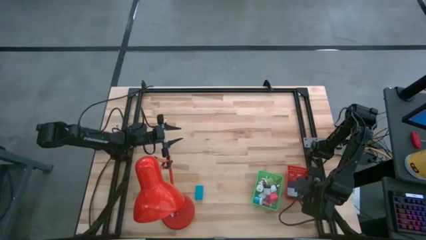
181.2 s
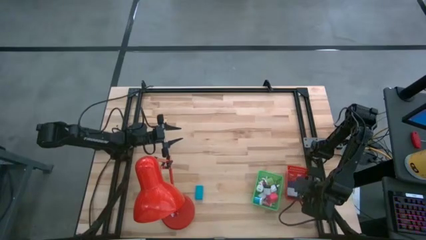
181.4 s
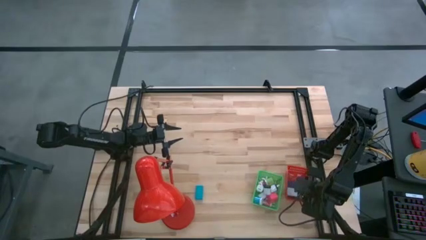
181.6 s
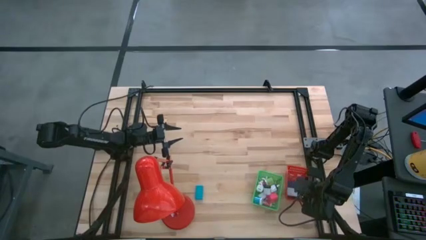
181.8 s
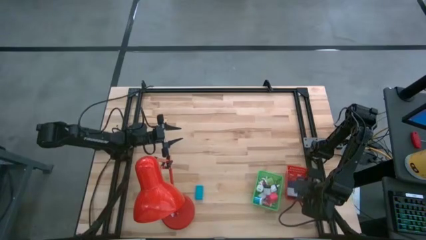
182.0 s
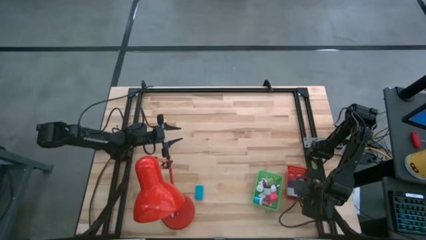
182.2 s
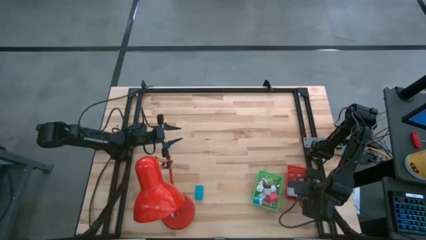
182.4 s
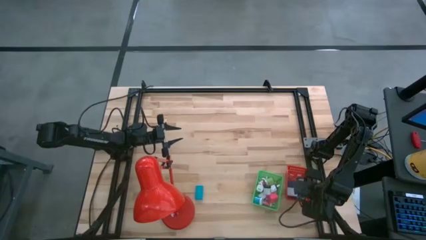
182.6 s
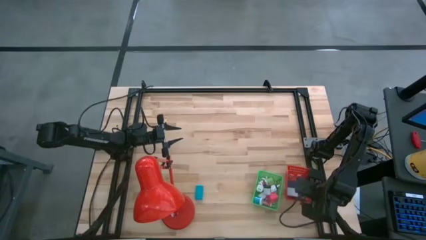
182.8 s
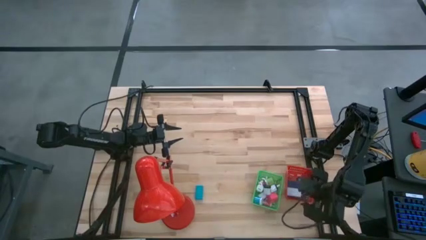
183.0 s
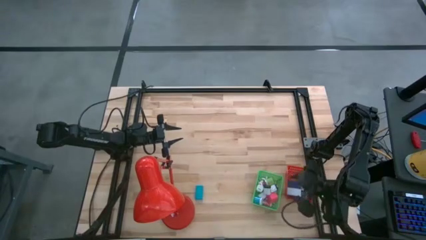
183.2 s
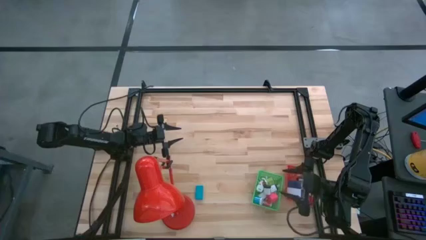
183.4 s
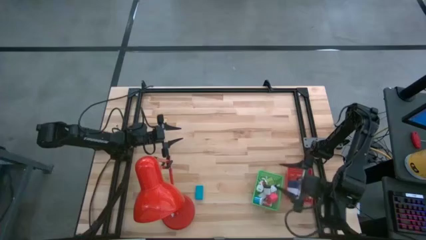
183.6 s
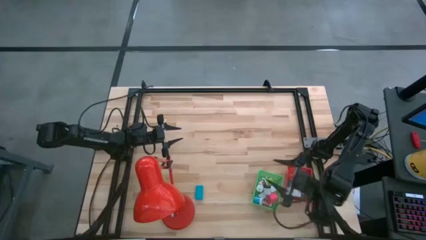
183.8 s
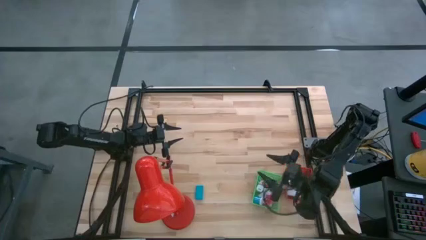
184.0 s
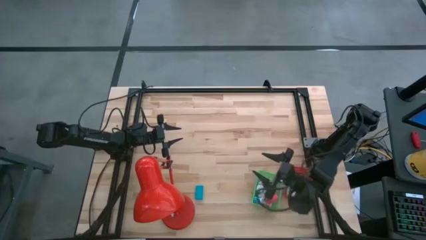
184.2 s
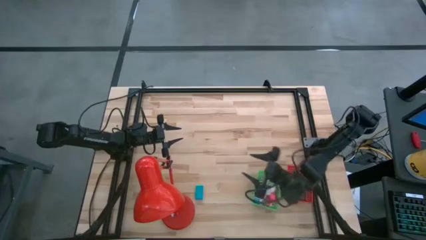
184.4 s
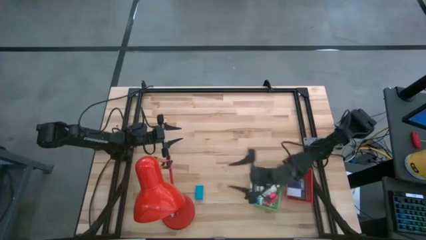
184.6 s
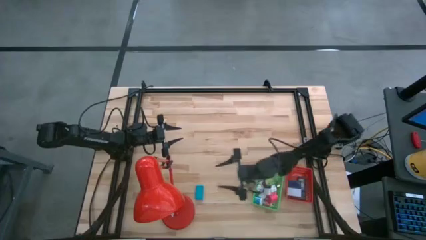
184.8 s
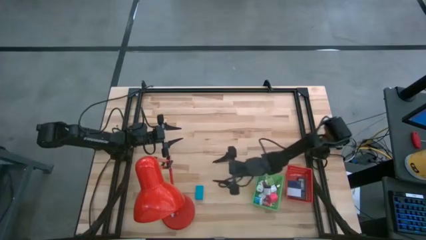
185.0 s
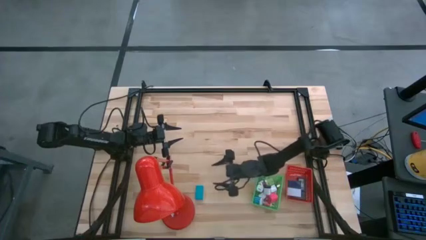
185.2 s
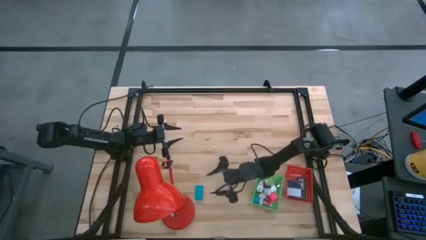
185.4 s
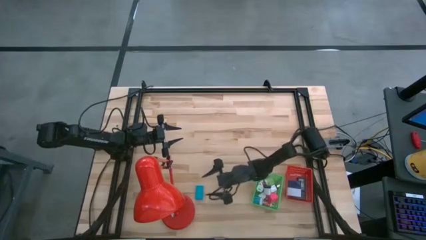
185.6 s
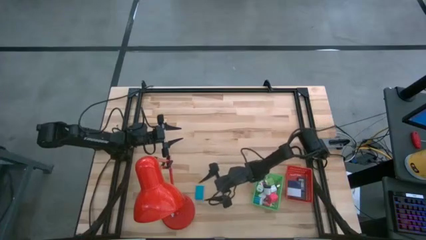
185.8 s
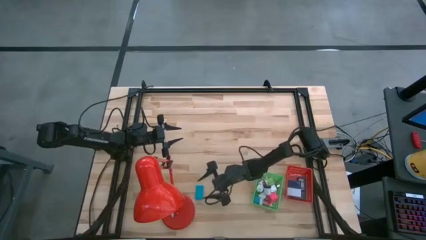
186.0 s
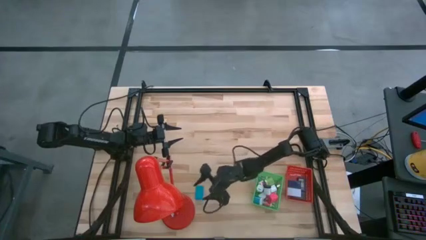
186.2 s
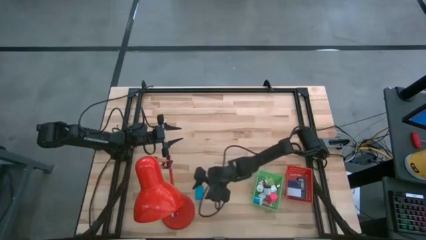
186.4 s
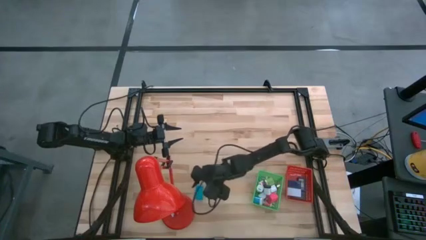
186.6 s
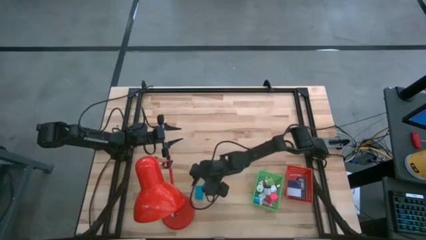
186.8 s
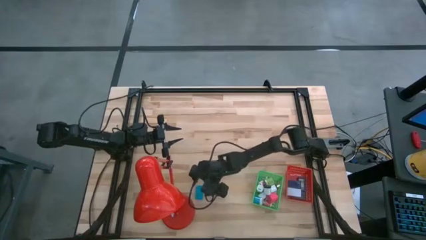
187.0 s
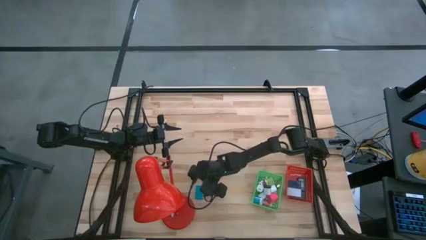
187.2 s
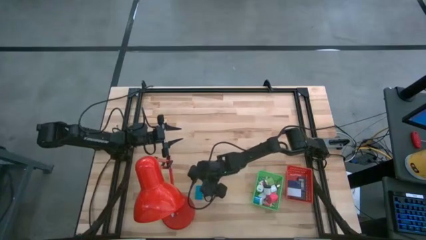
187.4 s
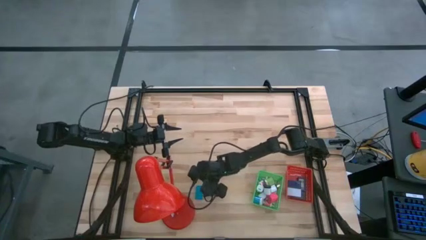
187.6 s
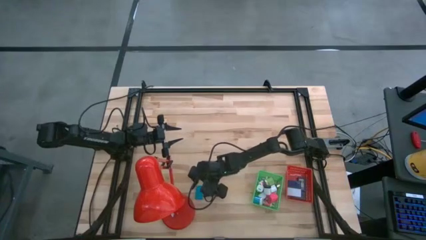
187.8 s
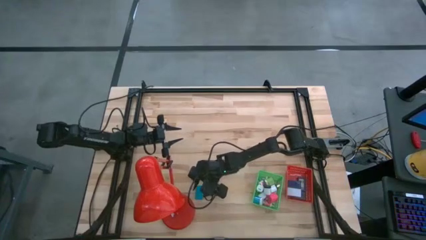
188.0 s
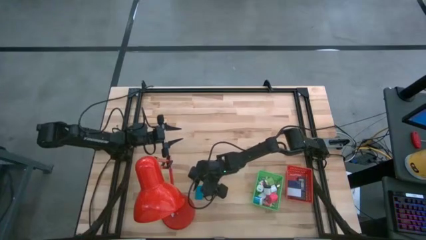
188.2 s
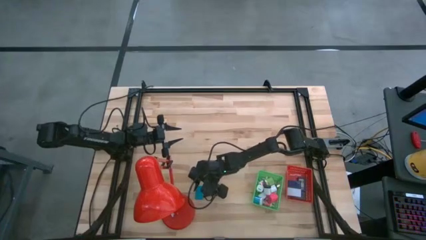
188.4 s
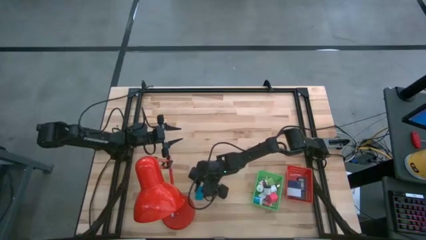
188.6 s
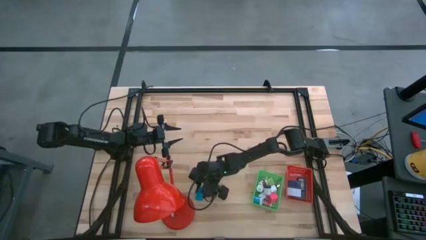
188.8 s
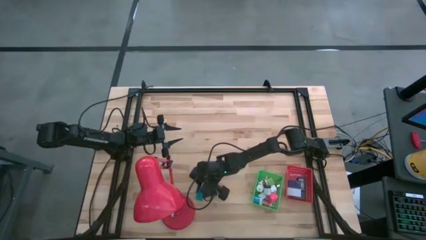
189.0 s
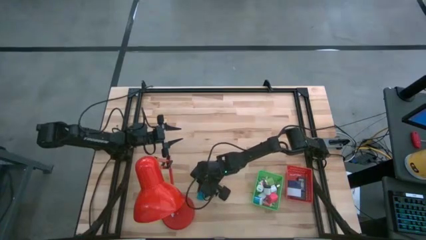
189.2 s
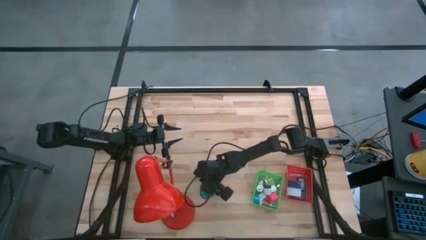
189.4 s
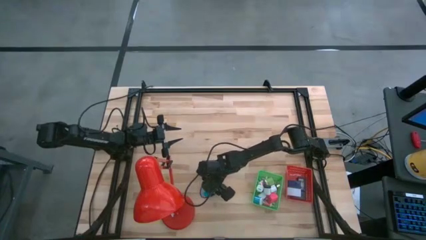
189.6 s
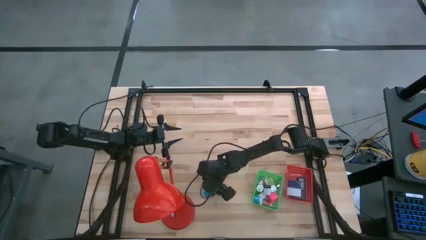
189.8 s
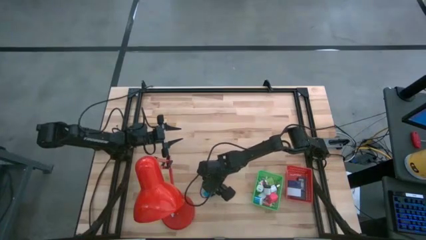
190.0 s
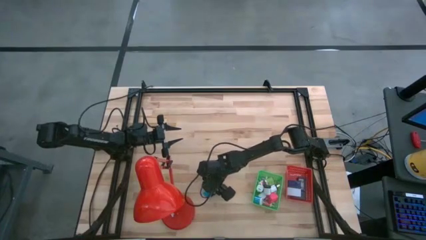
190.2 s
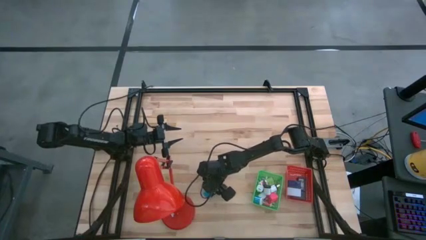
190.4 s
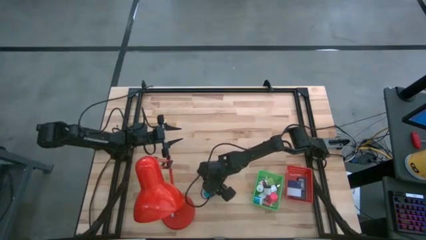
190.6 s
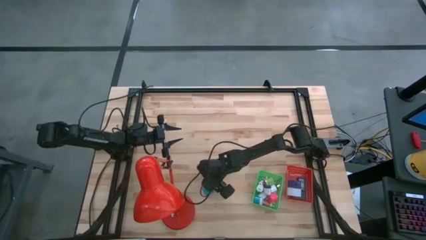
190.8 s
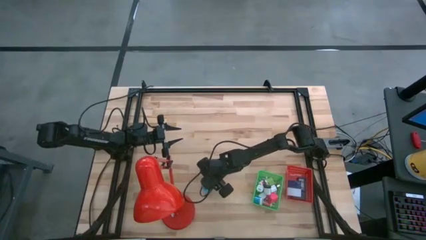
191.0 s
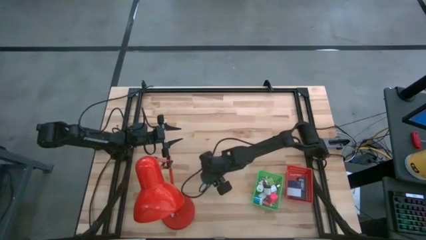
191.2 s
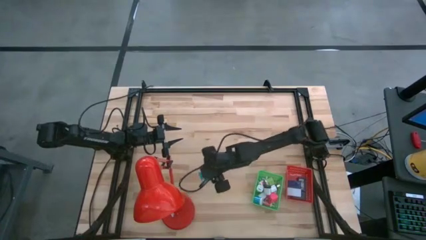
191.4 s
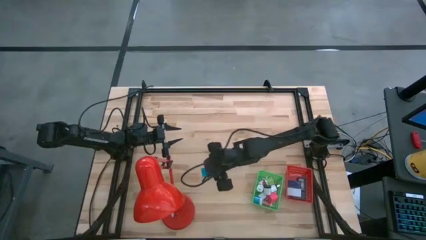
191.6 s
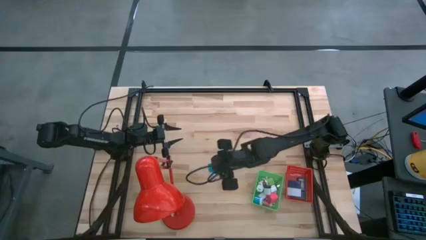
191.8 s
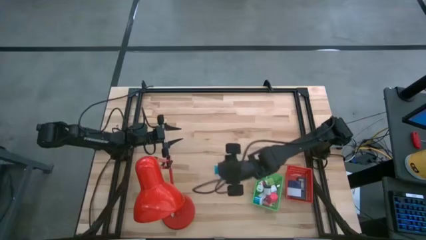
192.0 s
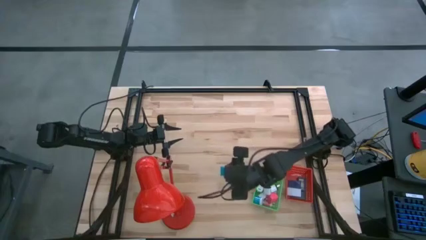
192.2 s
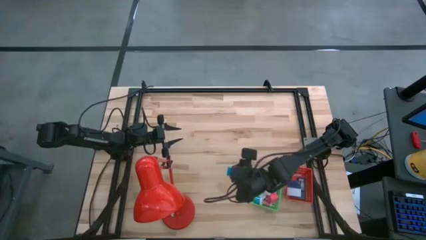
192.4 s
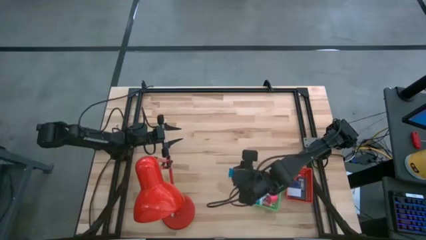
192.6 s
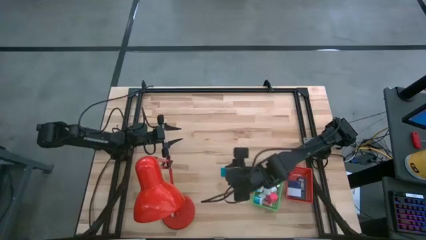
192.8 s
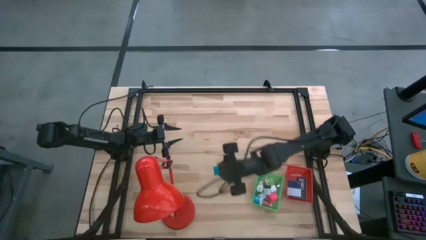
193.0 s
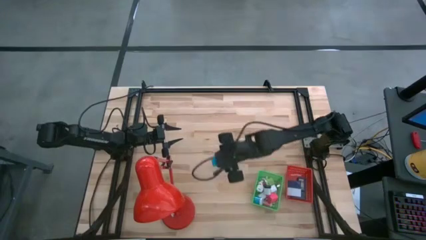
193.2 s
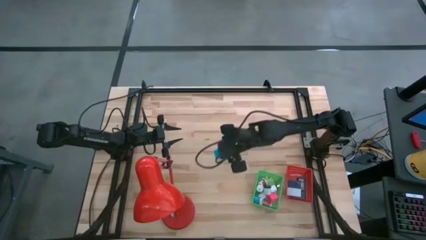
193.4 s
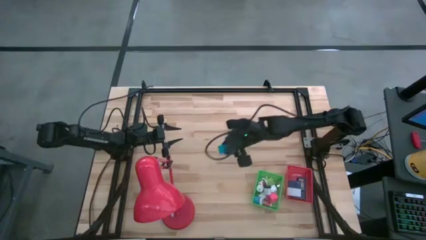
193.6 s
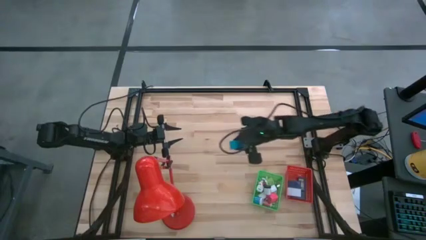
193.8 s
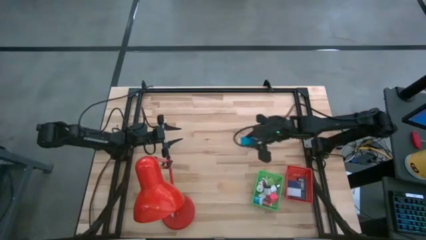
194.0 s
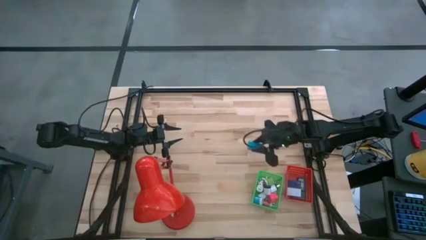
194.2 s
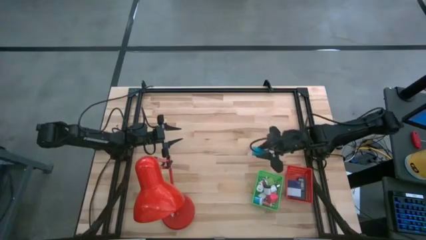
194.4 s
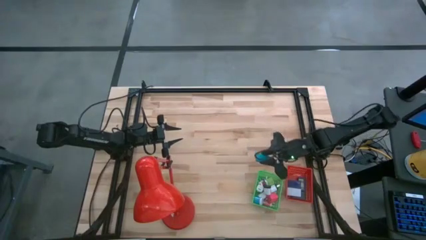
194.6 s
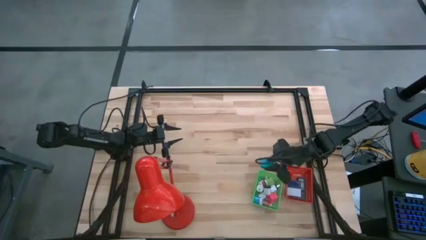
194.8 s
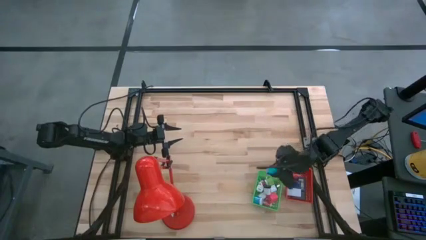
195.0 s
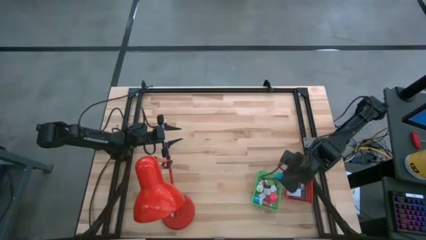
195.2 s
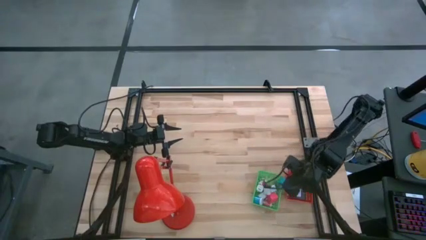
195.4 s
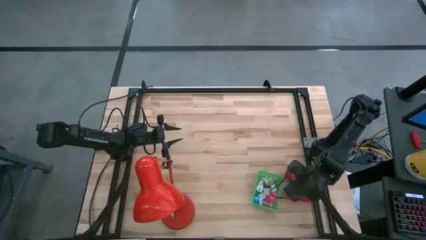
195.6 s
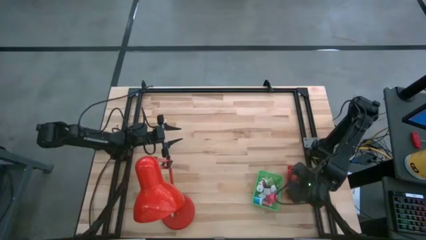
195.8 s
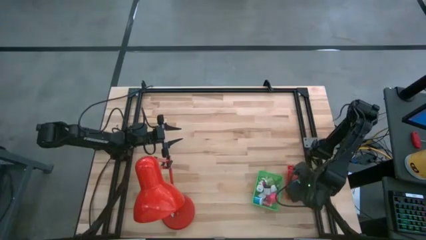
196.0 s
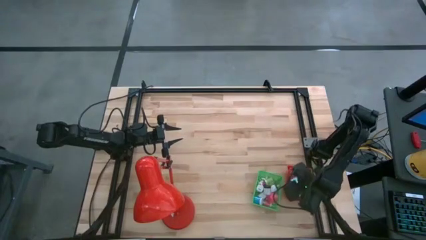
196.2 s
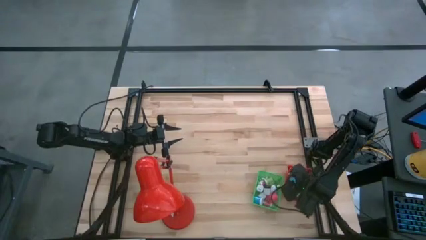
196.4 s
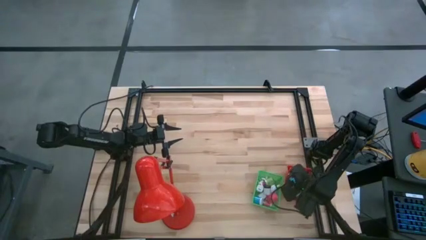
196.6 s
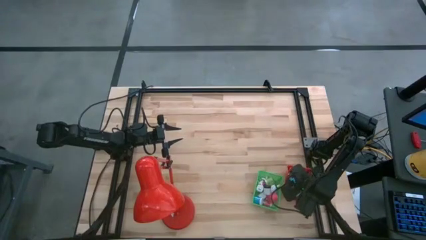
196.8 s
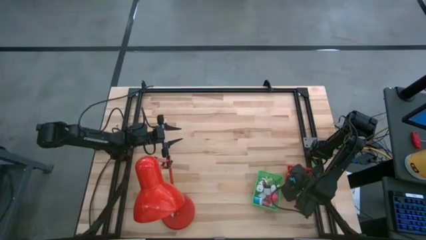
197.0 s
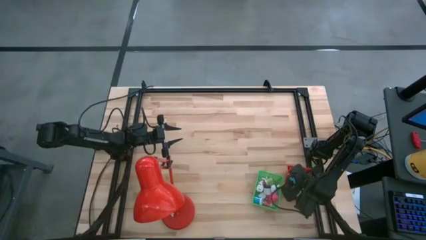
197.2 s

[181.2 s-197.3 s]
Task: Pick & Place Office items
Put the light blue digital clock into the red basket
